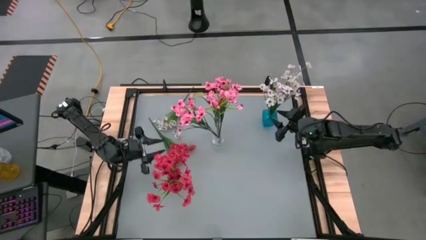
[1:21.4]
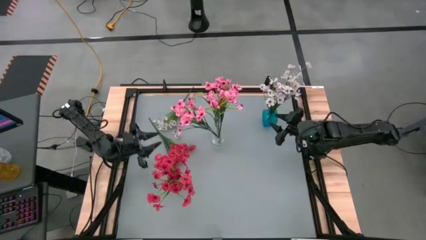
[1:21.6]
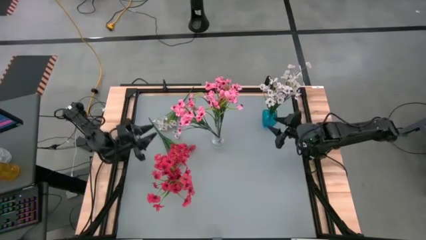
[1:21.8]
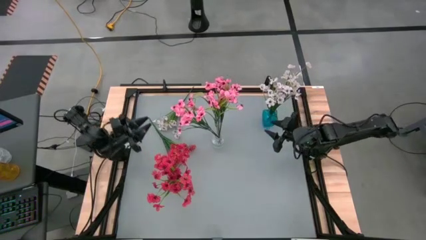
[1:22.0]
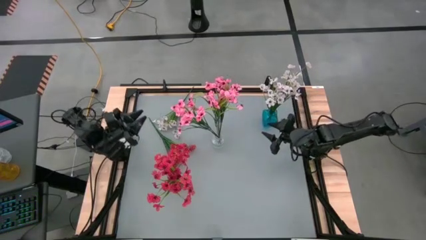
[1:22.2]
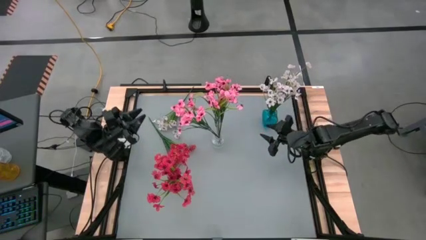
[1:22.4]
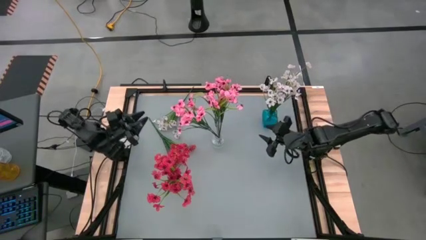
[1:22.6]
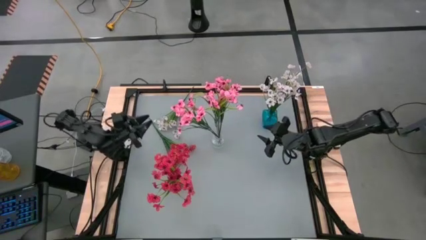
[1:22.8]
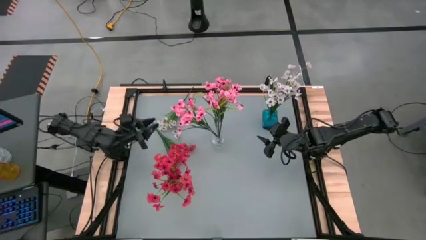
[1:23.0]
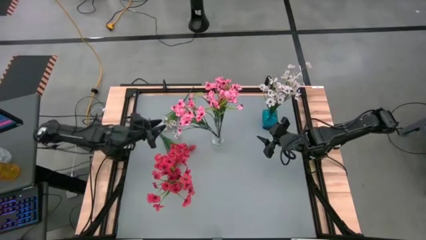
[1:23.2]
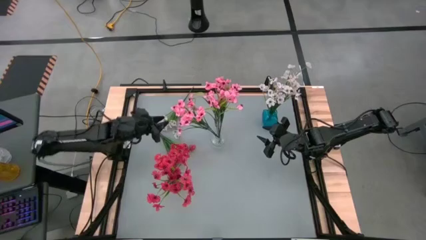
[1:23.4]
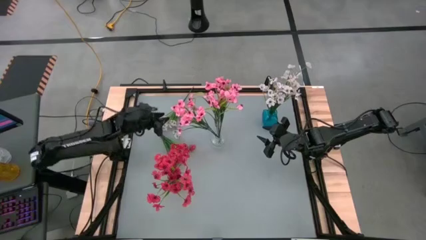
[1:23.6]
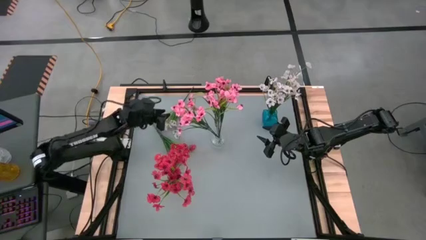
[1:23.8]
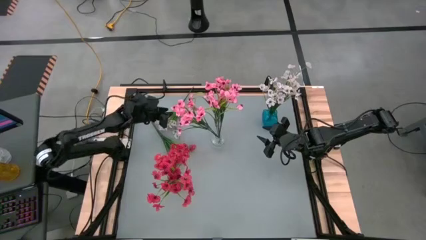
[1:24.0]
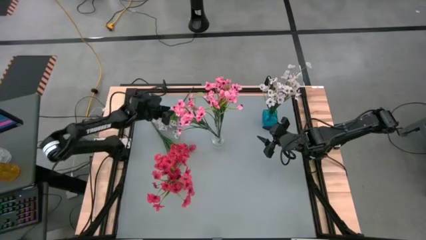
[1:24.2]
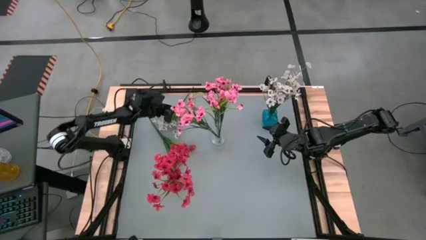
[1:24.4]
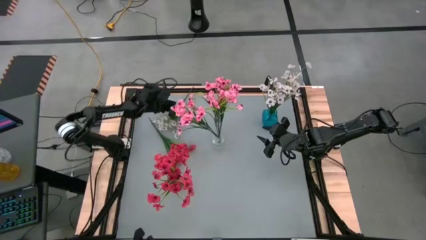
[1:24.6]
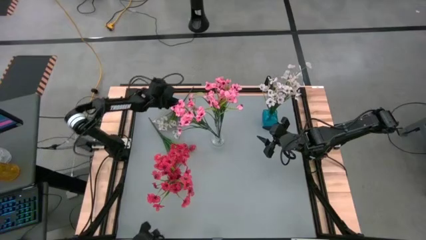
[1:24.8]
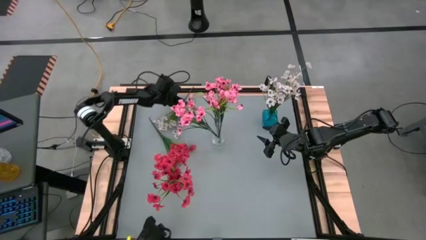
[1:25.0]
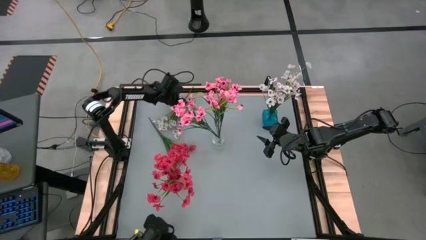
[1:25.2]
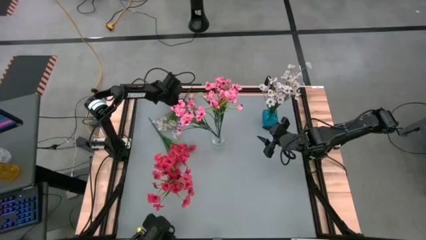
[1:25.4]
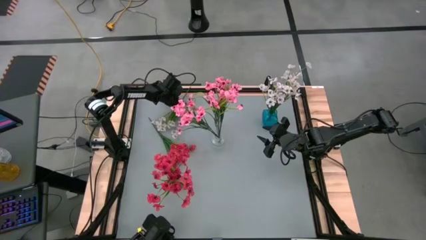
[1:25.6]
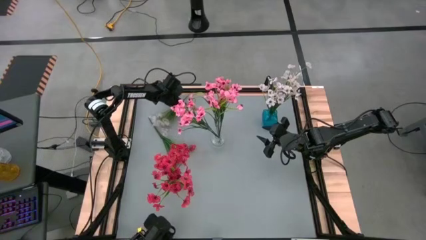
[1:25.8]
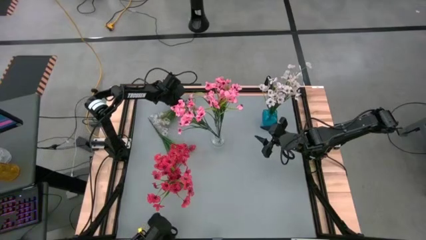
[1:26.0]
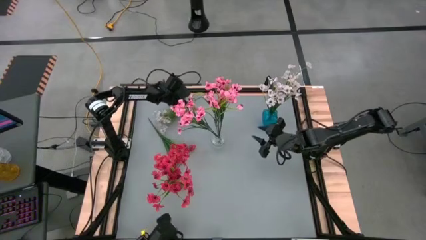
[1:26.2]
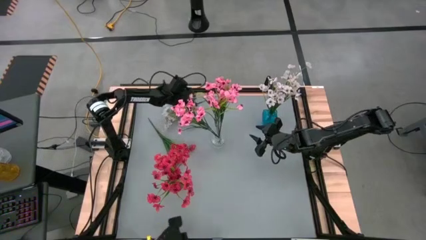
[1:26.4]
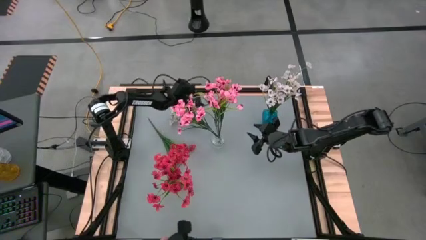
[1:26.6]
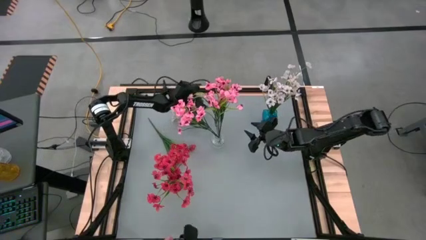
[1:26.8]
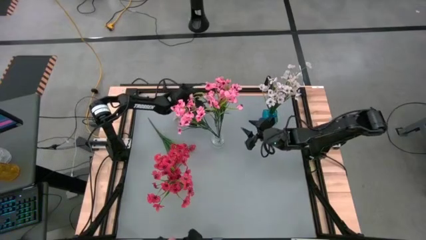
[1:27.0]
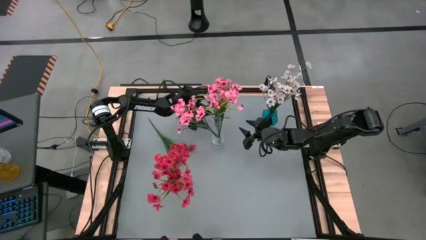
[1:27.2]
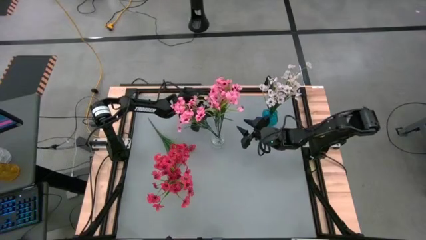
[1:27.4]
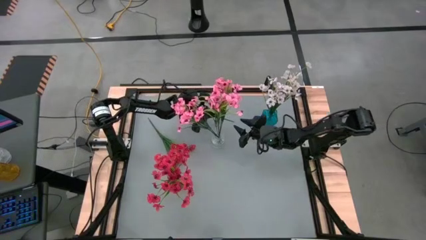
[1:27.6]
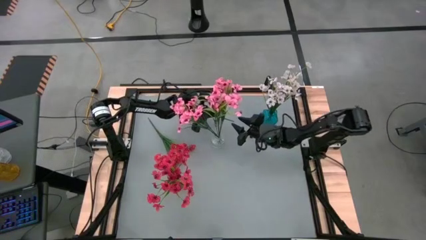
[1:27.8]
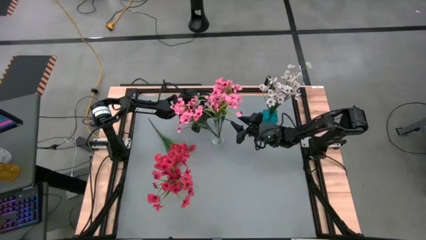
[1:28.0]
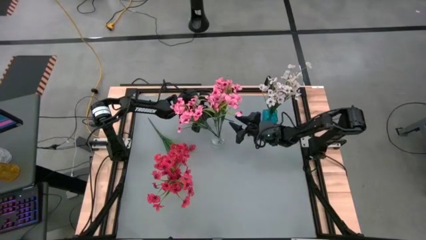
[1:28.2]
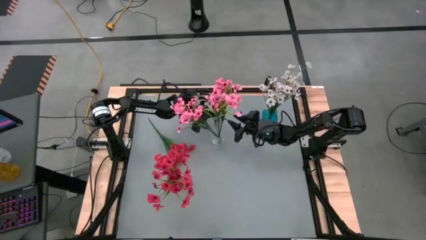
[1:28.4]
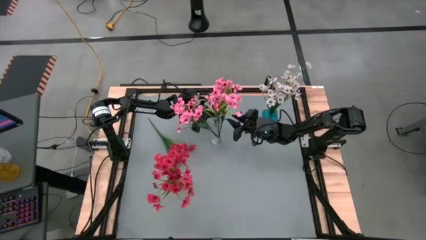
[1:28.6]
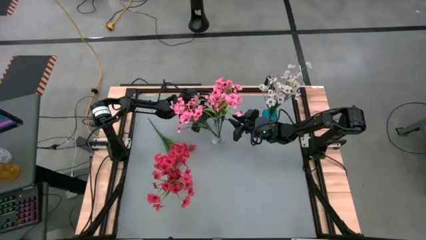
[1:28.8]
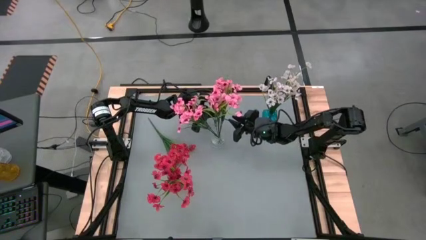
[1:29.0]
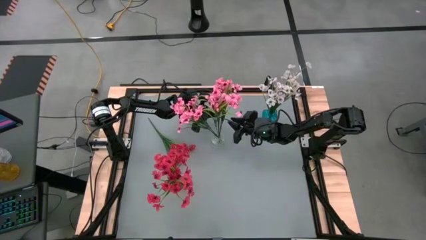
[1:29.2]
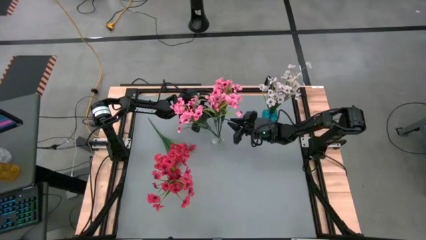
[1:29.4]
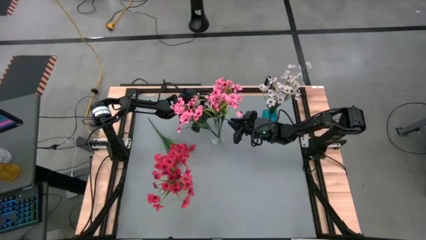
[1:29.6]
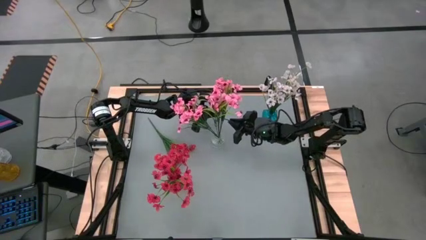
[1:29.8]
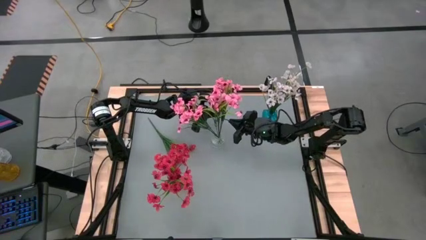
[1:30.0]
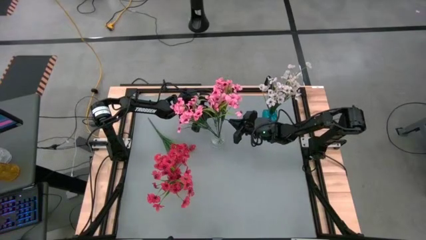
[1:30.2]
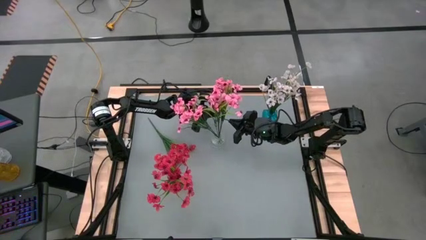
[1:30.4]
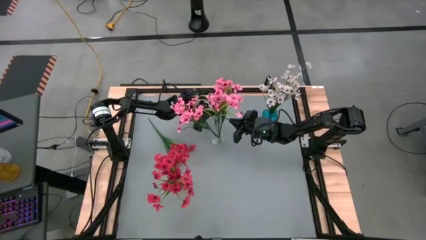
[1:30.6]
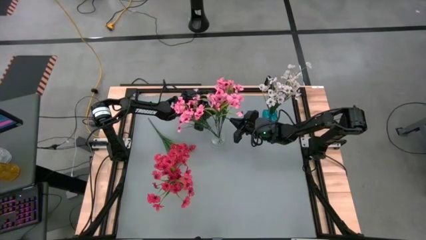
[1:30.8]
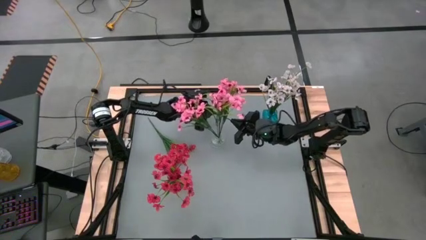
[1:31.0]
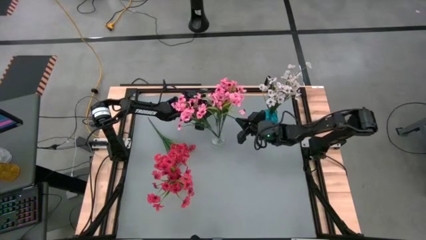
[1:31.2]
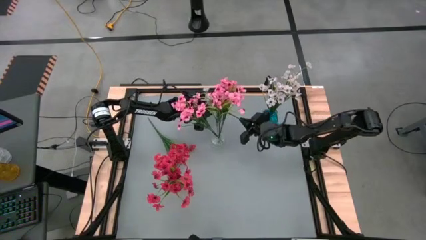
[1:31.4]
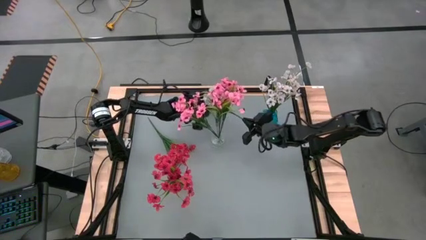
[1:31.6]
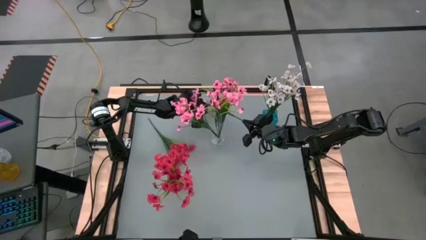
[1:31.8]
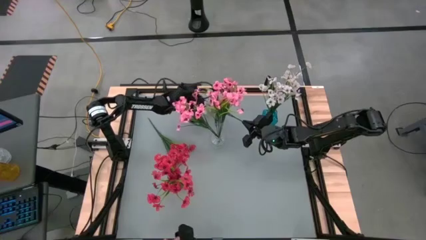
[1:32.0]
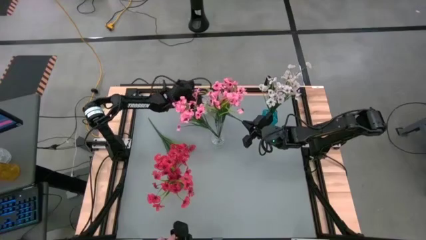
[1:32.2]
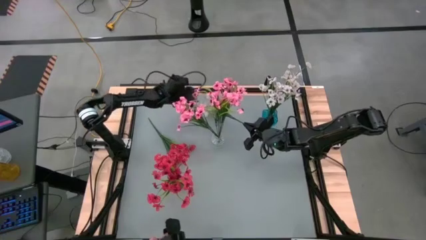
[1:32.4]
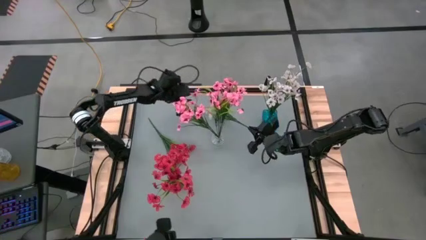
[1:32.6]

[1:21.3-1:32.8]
Task: Sort flowers into vase by color
Put the white flowers into the blue base

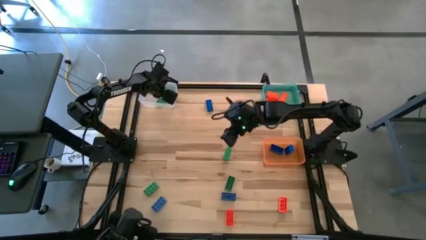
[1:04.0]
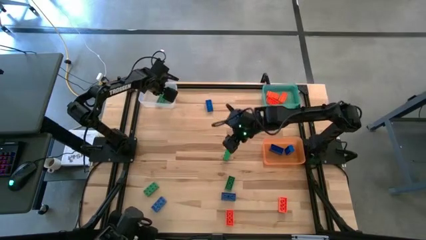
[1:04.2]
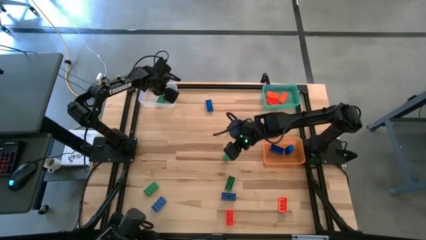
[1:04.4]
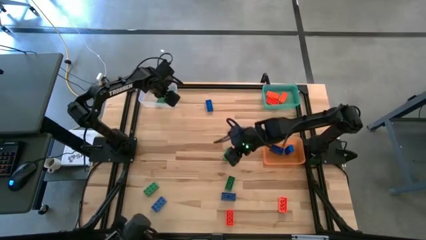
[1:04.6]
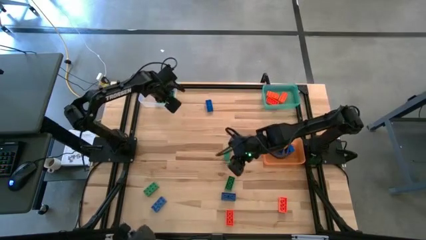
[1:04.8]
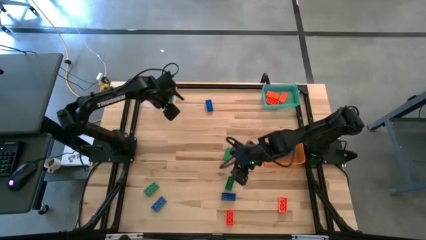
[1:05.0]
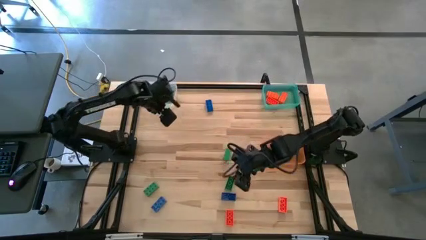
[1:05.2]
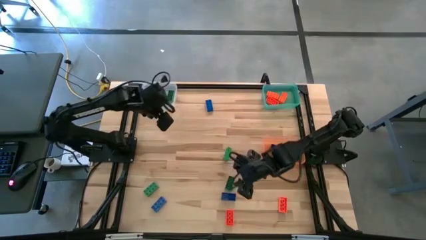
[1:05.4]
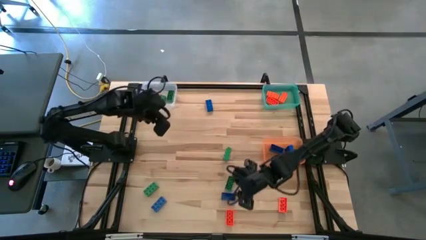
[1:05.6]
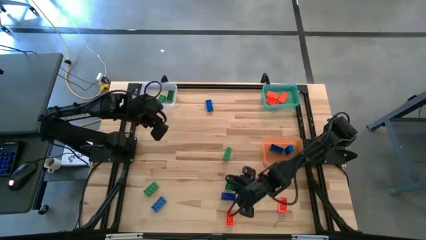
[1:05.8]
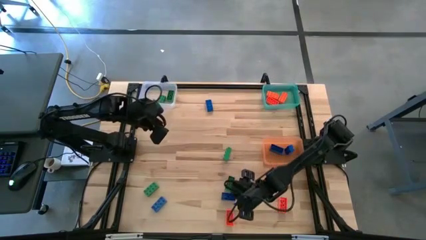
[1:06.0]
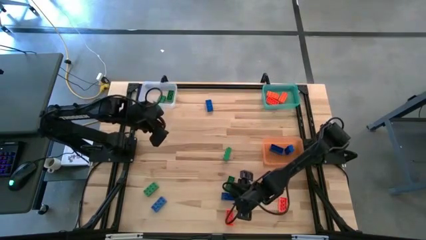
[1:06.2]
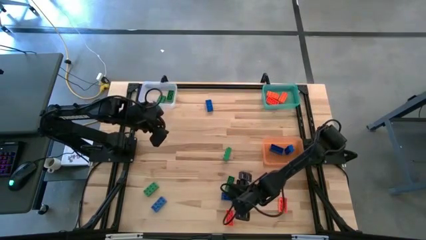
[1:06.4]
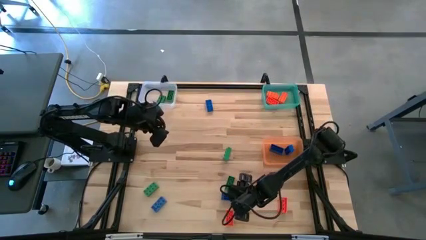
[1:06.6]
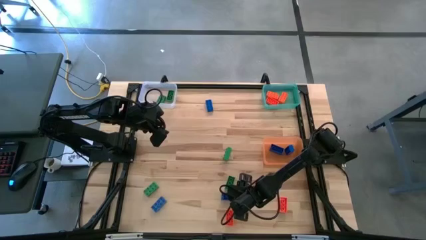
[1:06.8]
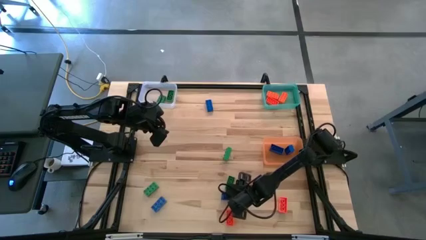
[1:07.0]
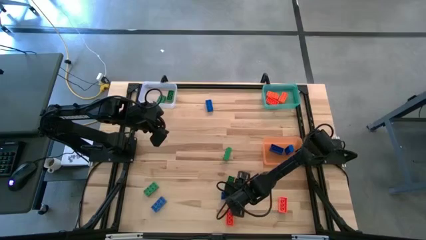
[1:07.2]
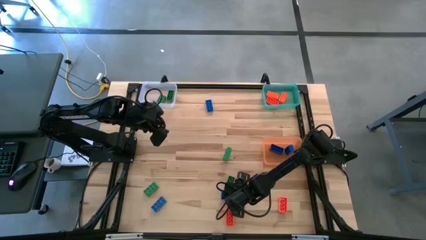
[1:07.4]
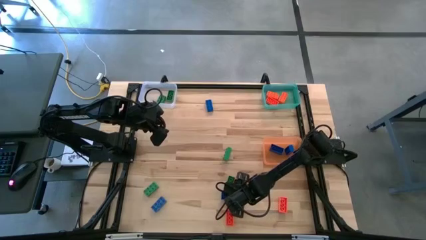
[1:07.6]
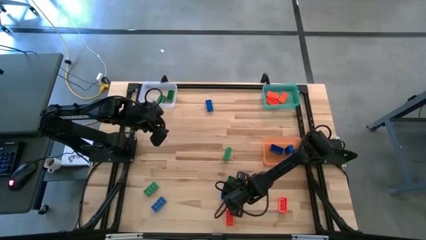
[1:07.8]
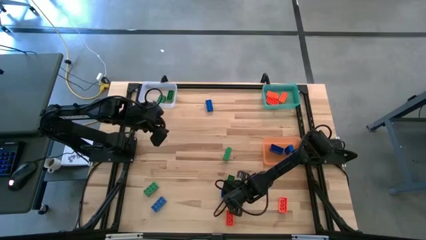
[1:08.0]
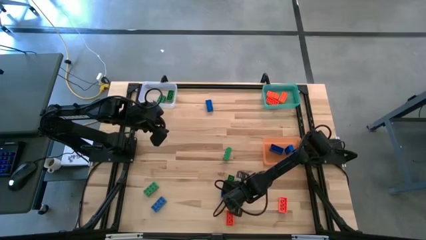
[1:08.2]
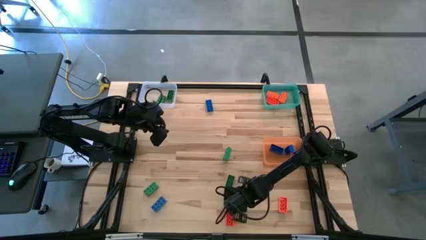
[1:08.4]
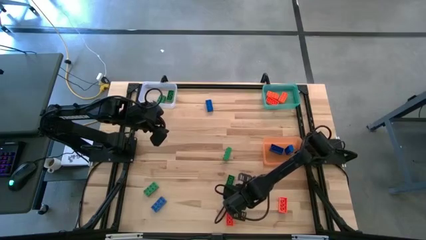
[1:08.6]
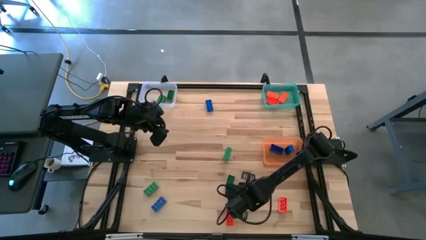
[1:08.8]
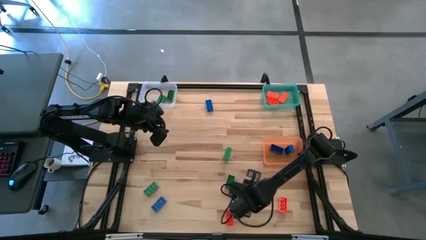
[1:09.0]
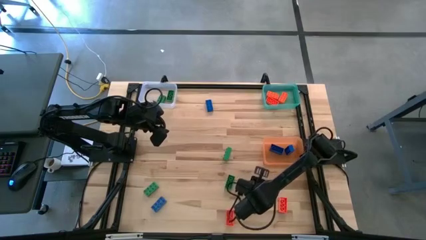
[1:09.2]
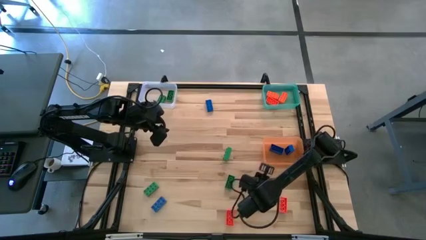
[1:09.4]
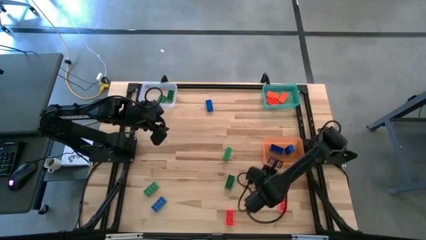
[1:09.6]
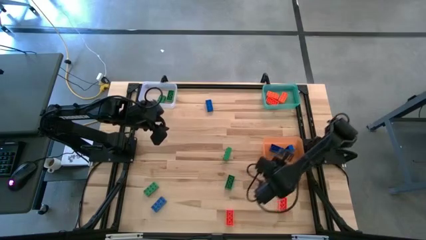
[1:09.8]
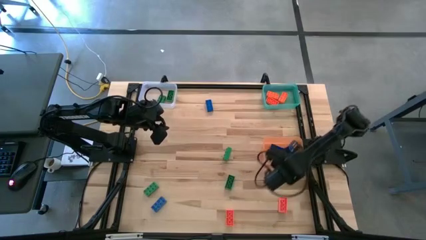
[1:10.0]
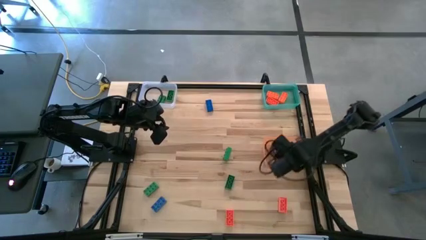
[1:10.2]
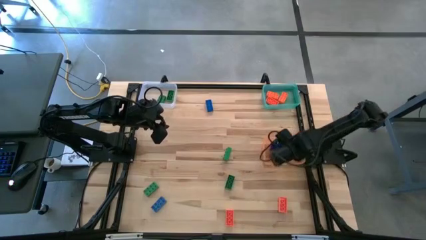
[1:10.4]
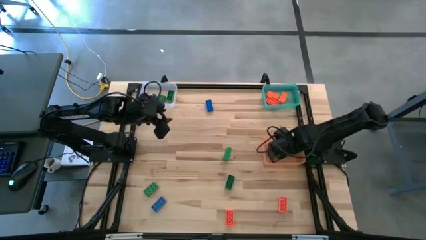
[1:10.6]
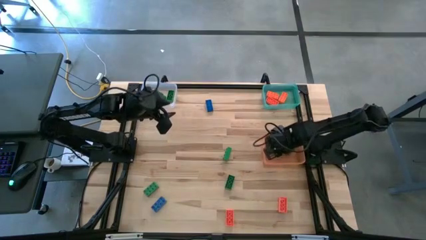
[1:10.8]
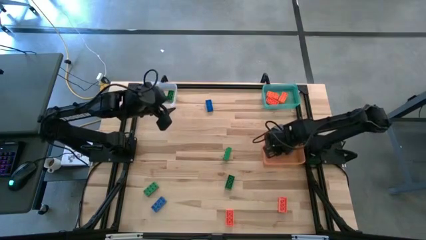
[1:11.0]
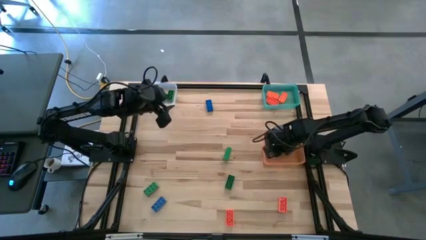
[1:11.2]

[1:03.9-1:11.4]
Task: Sort & place blocks by color
Put the right blue game piece into the orange bin
